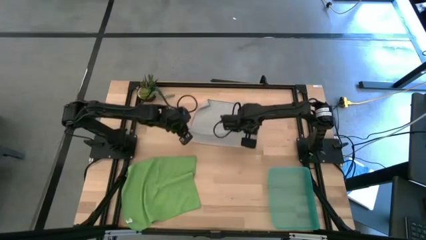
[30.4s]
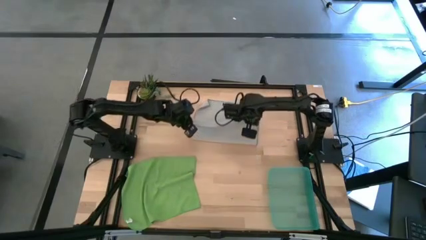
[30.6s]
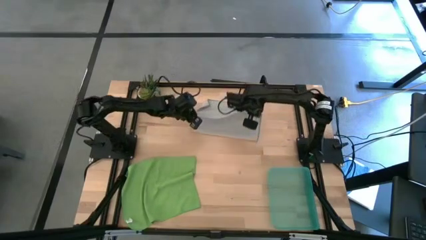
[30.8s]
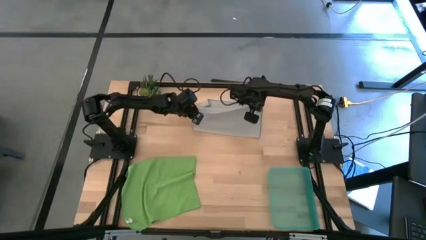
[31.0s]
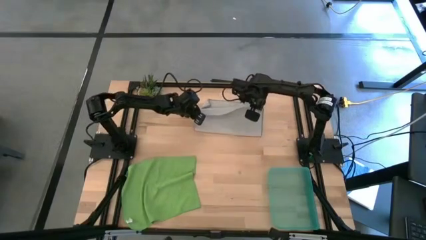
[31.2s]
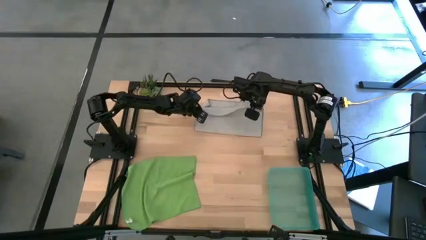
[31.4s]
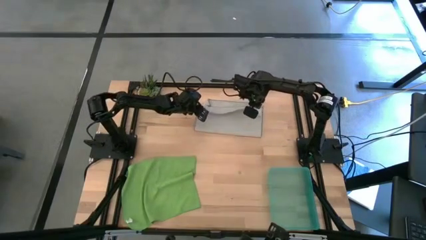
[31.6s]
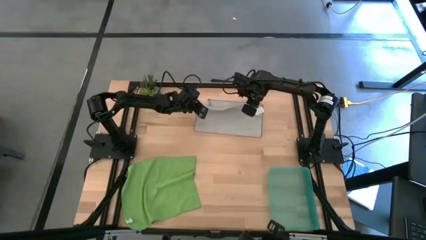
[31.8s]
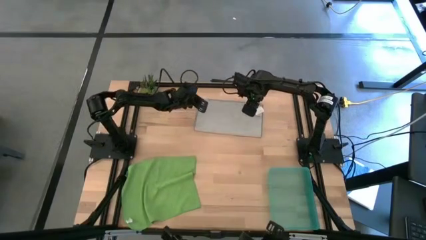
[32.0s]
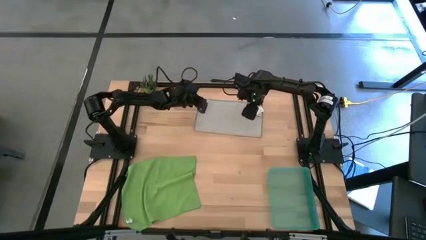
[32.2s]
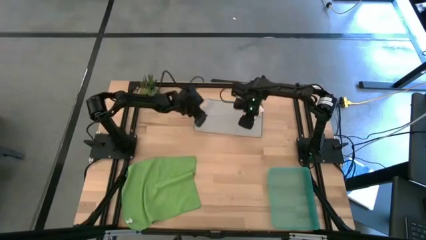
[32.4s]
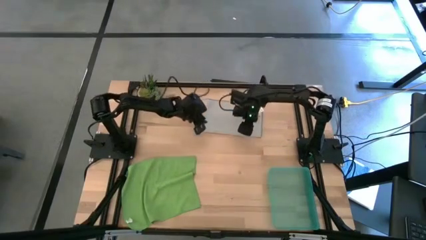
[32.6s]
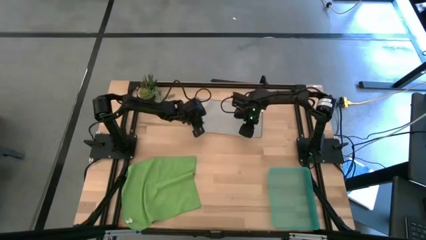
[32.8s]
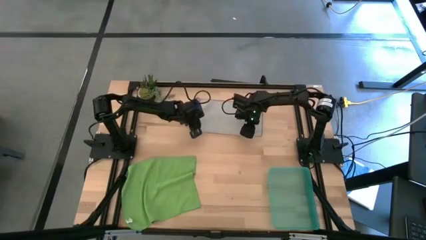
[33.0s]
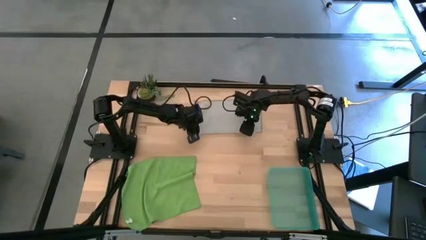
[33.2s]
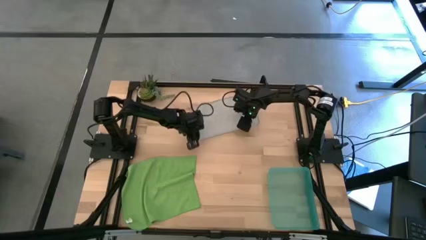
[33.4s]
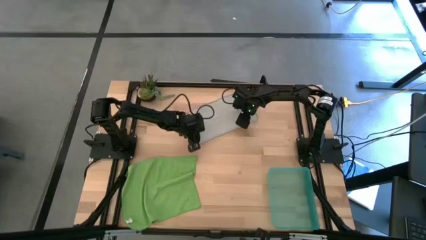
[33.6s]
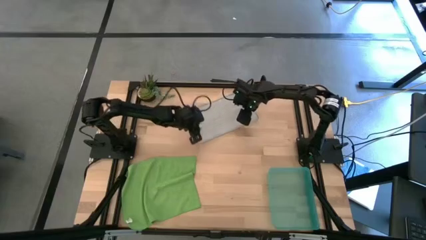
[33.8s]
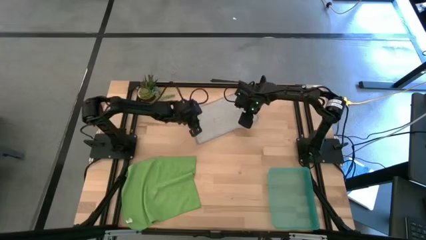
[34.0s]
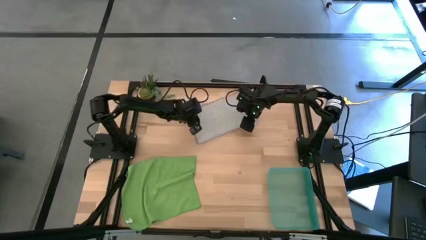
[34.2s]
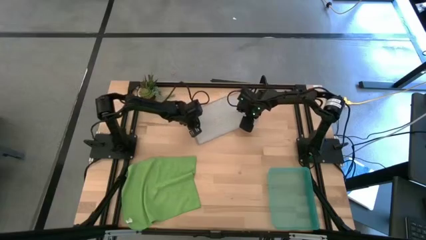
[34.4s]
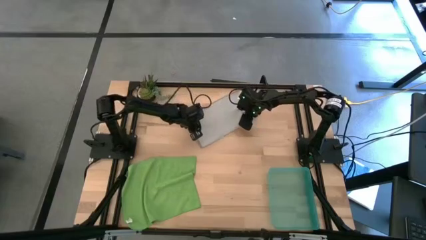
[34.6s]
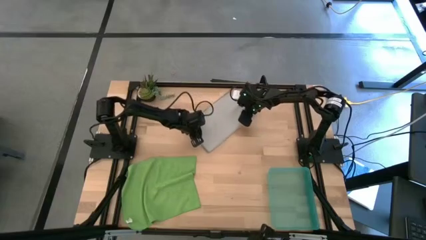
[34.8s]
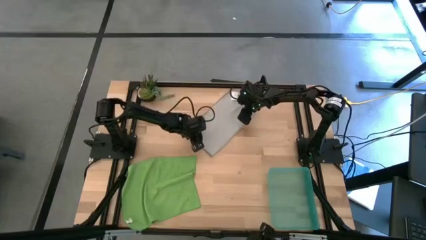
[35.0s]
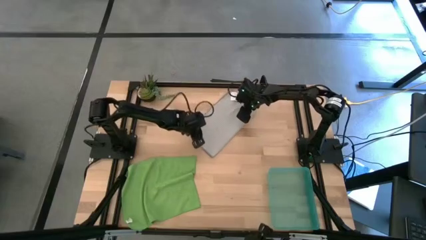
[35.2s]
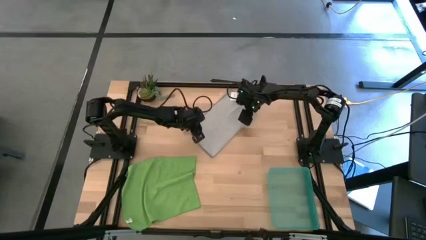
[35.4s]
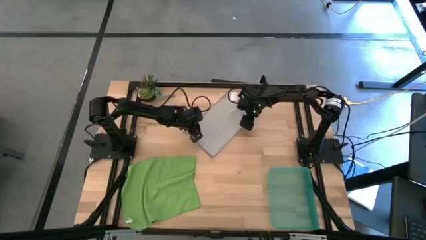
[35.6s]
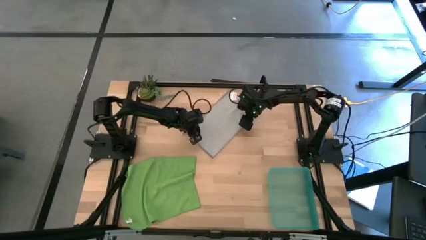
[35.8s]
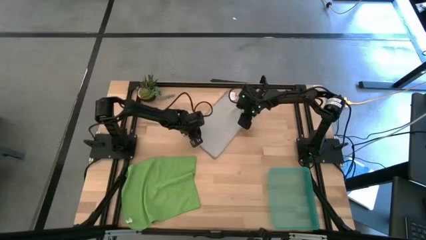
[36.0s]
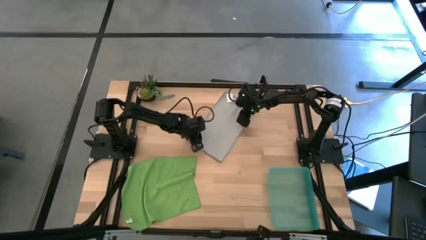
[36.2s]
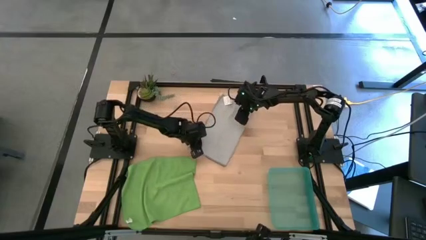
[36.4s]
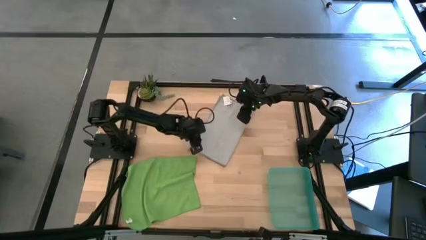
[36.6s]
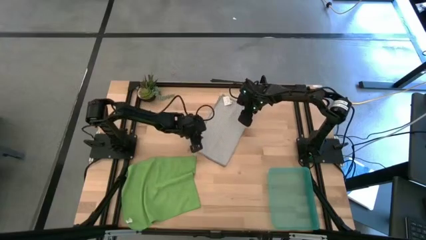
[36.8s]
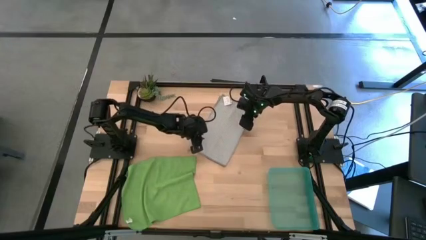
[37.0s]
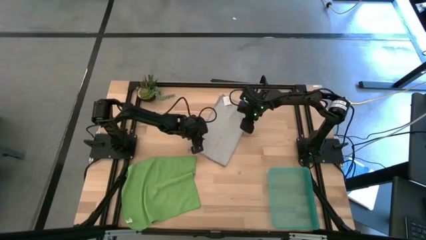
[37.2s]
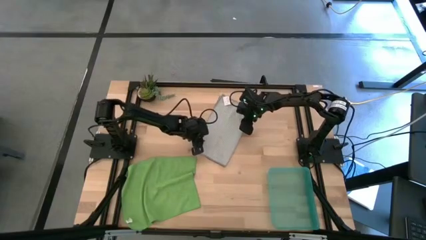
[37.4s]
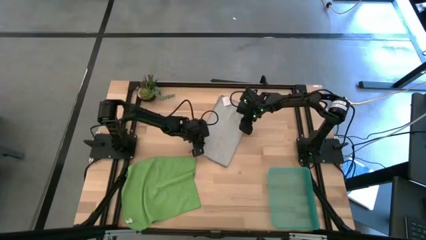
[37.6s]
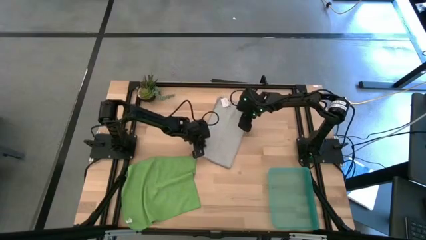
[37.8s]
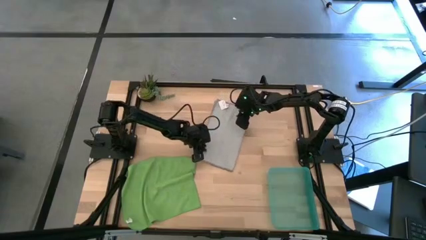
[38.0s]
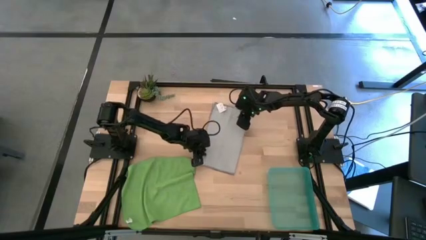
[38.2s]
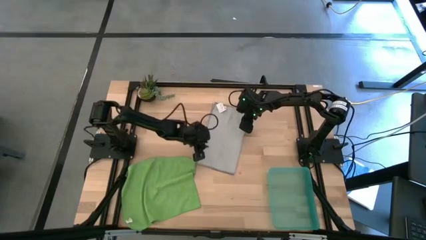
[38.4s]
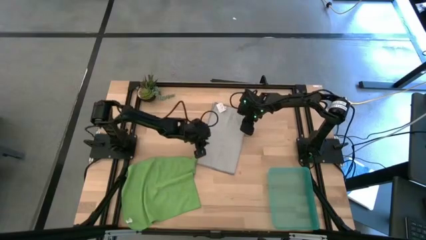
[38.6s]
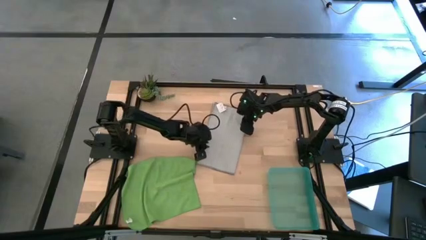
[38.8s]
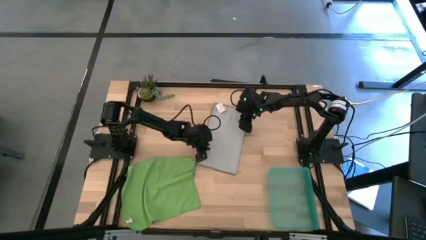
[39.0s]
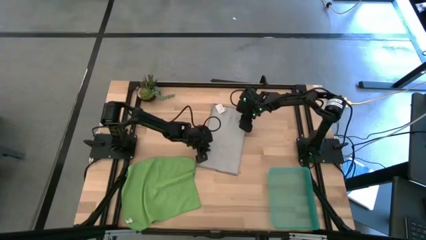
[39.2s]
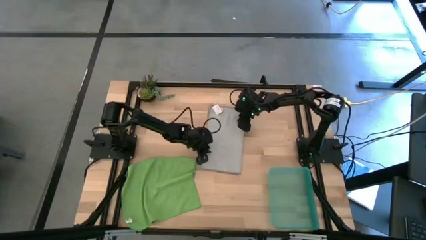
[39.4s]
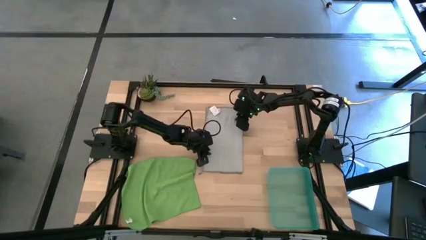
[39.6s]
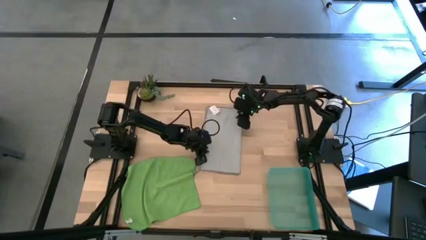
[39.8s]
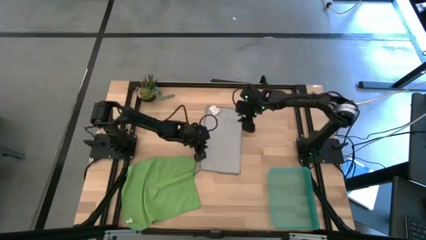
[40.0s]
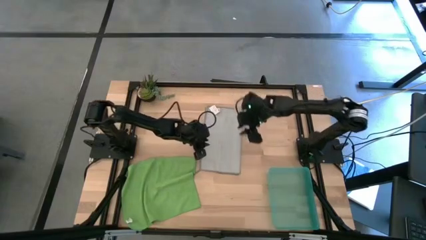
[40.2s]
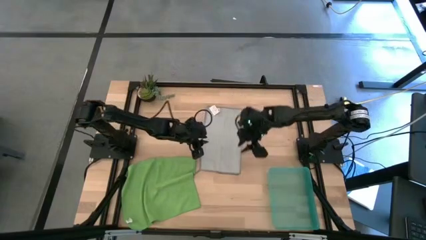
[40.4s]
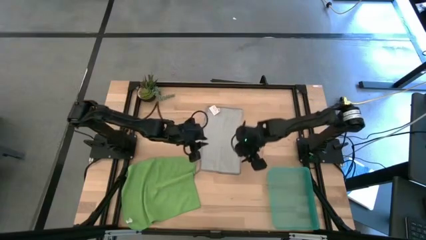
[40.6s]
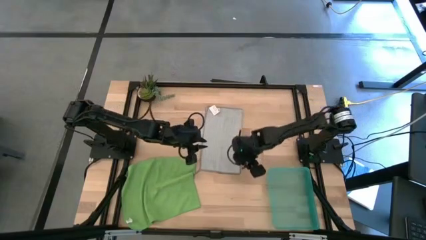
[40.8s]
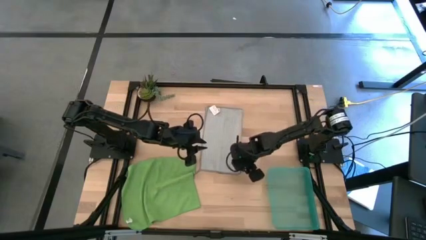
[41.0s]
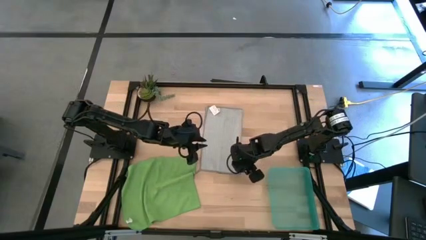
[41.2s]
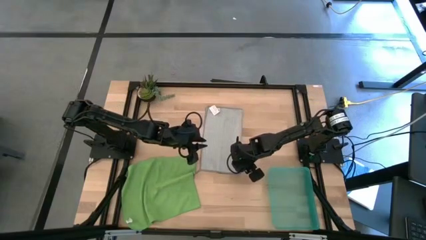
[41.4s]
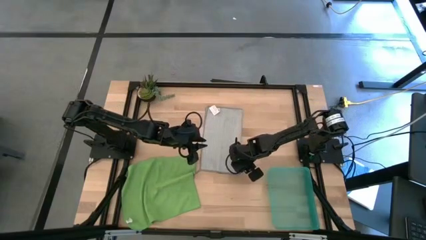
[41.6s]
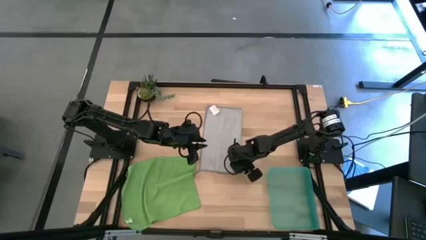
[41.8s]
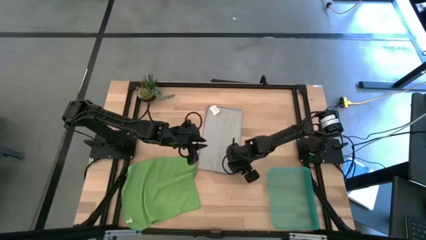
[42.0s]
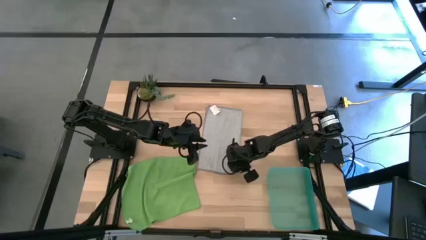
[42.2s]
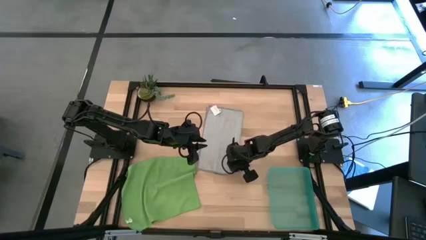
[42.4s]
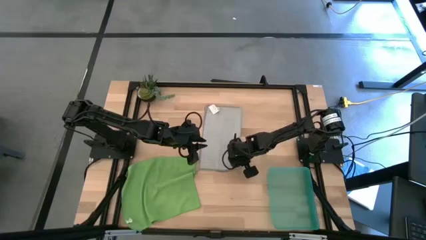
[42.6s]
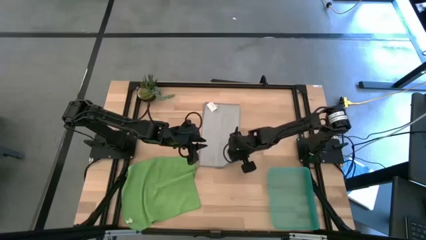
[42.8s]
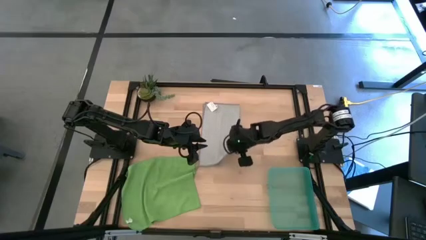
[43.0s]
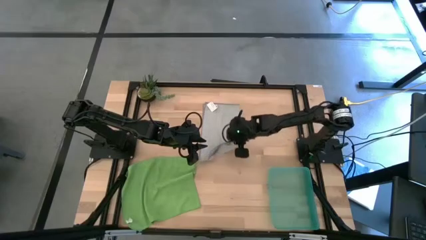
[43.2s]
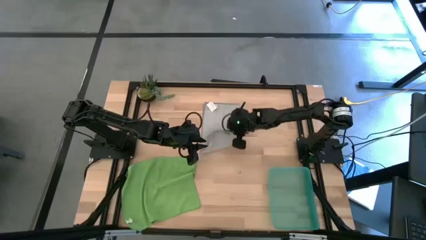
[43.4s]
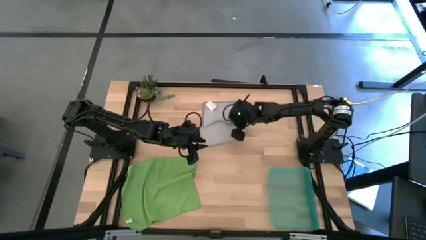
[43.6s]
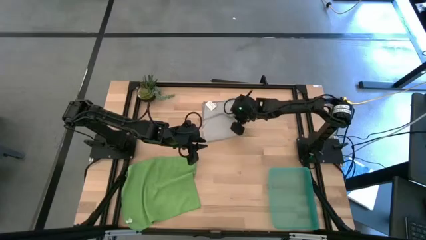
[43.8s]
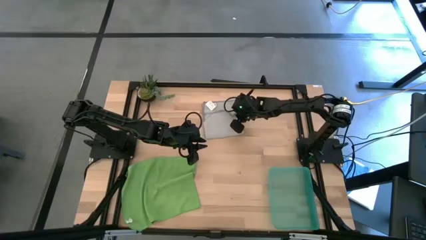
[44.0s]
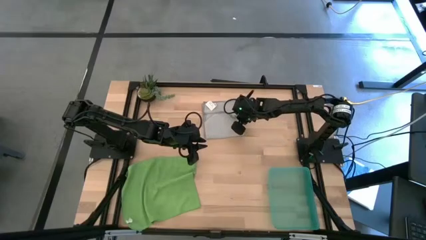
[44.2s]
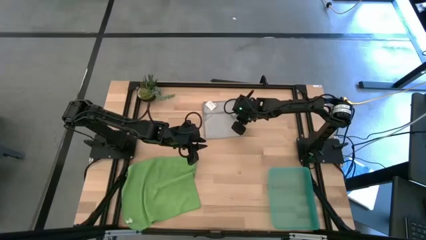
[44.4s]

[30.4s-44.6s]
Task: Roll microfiber towels into tight, uniform cylinder then place into a basket
Fold the gray microfiber towel
